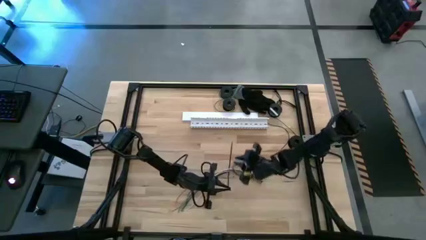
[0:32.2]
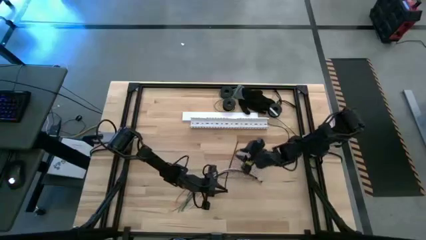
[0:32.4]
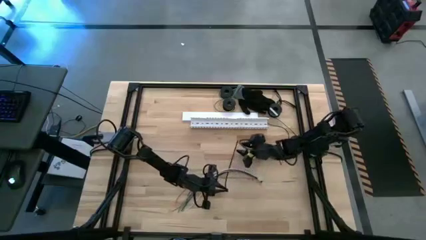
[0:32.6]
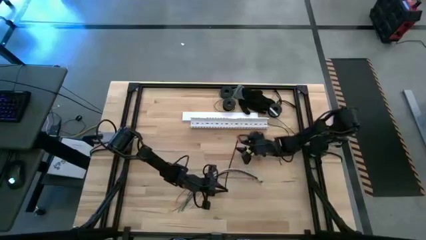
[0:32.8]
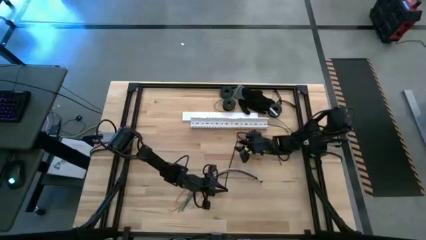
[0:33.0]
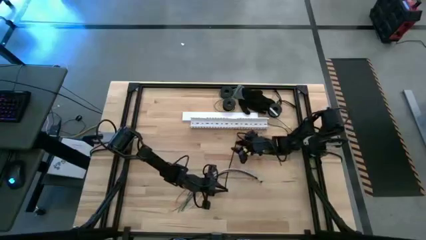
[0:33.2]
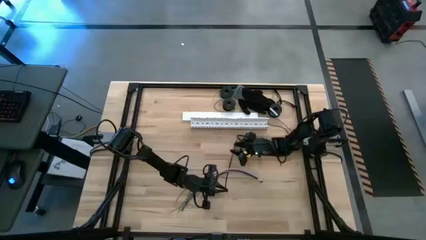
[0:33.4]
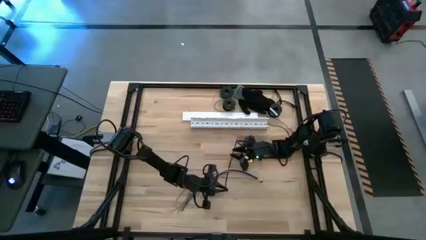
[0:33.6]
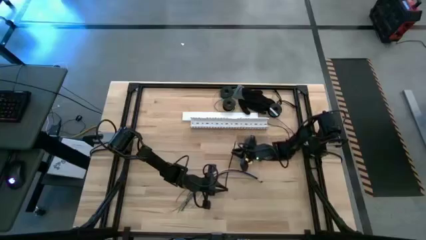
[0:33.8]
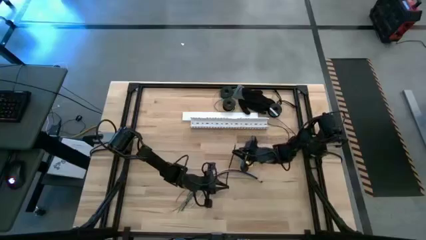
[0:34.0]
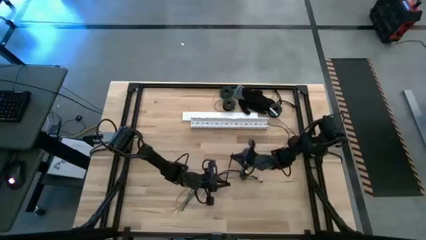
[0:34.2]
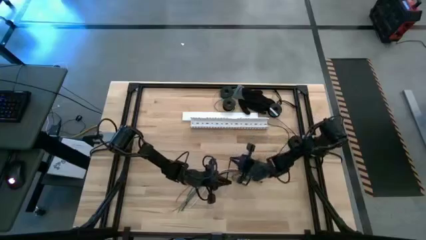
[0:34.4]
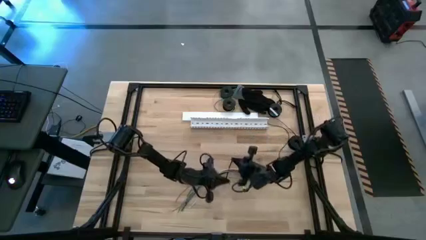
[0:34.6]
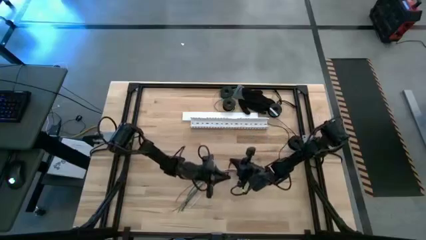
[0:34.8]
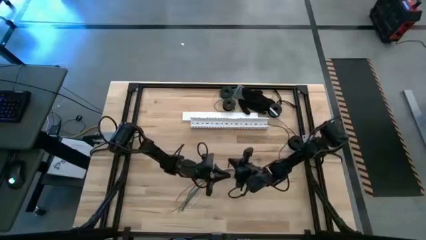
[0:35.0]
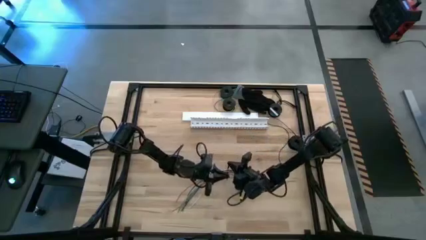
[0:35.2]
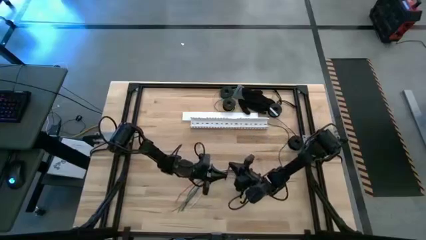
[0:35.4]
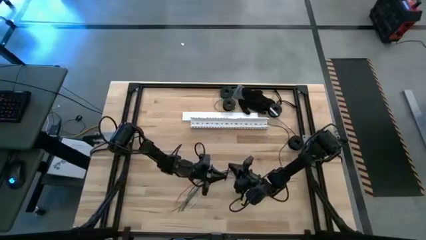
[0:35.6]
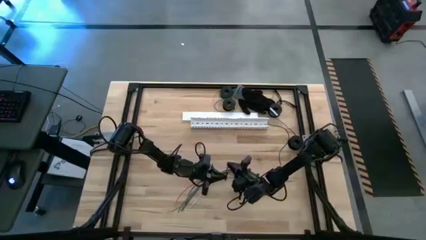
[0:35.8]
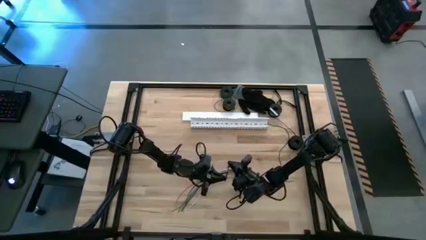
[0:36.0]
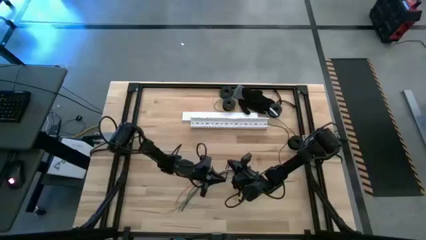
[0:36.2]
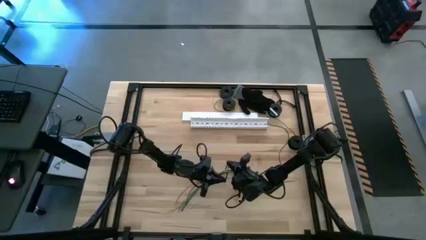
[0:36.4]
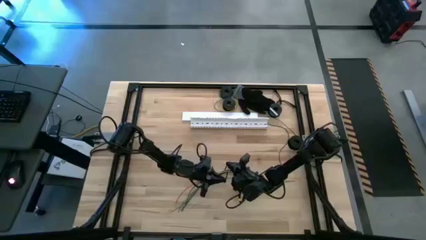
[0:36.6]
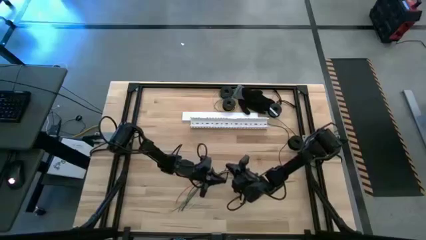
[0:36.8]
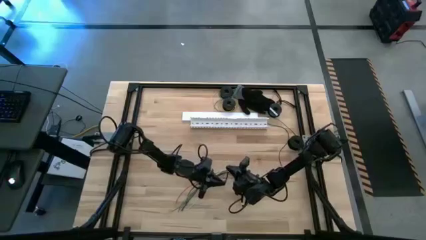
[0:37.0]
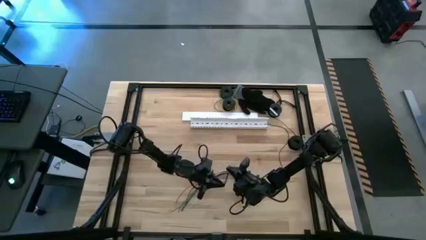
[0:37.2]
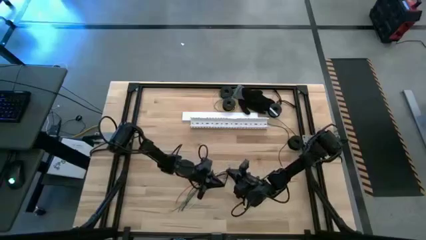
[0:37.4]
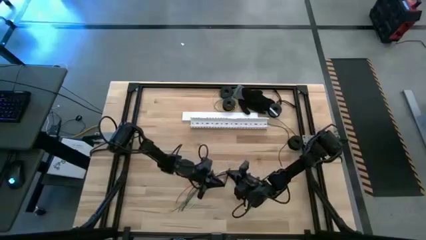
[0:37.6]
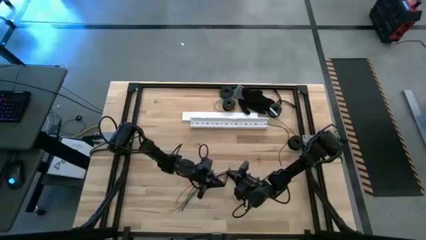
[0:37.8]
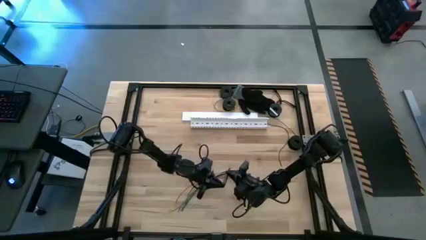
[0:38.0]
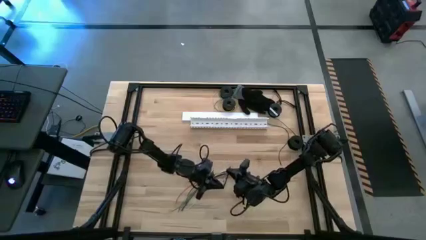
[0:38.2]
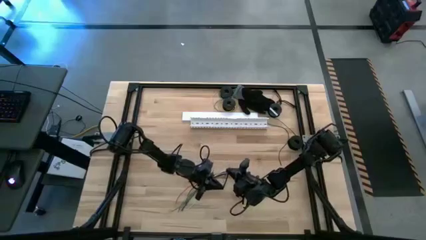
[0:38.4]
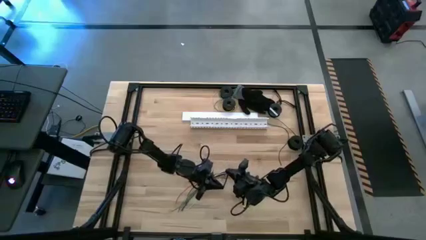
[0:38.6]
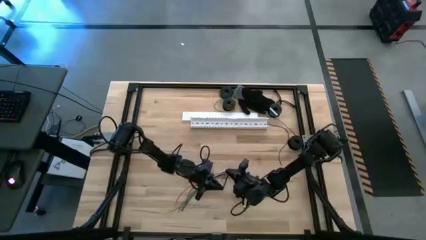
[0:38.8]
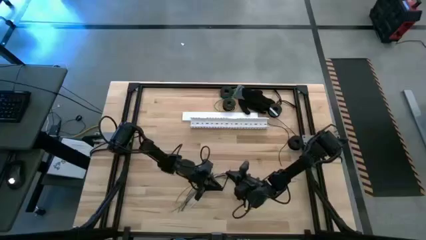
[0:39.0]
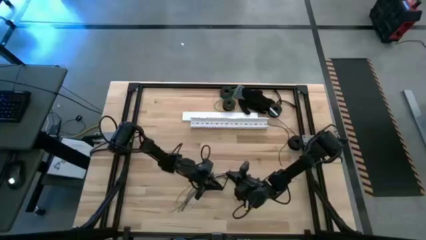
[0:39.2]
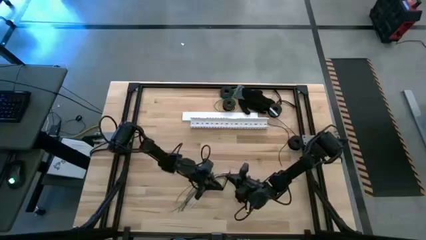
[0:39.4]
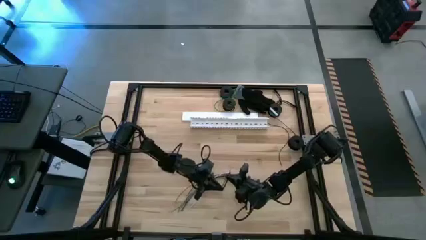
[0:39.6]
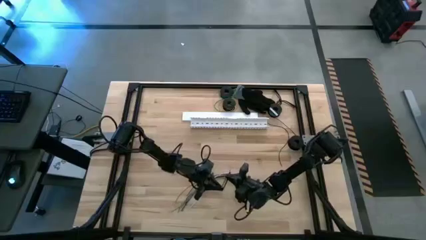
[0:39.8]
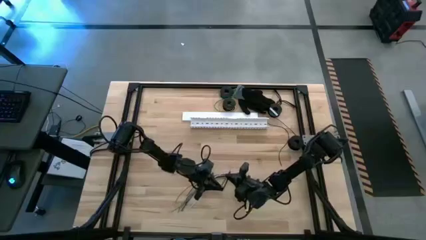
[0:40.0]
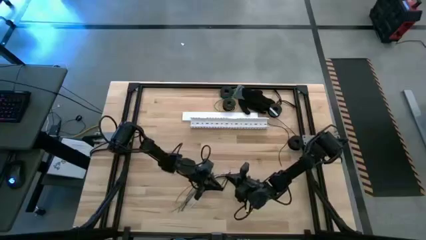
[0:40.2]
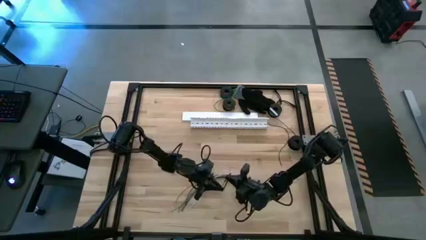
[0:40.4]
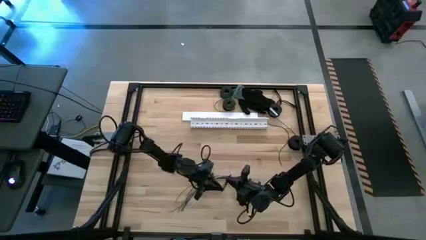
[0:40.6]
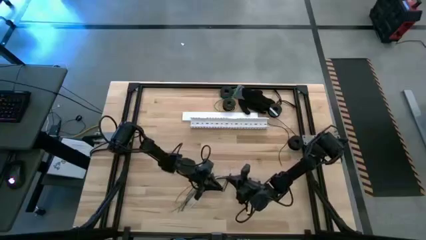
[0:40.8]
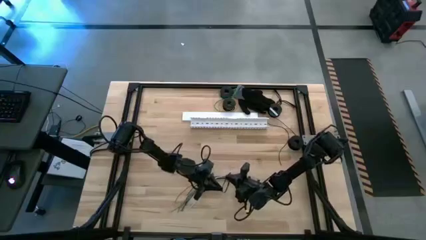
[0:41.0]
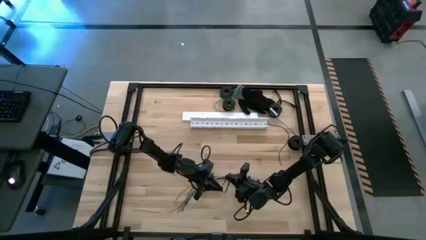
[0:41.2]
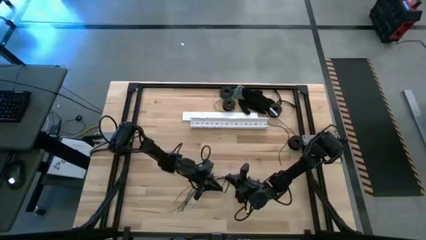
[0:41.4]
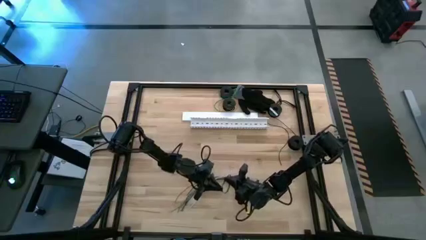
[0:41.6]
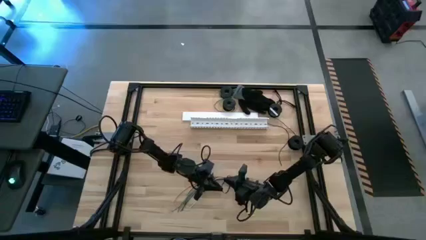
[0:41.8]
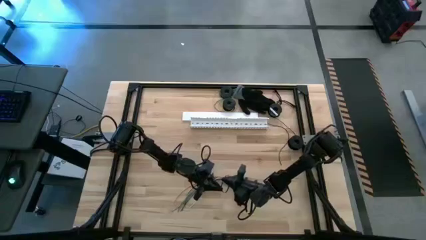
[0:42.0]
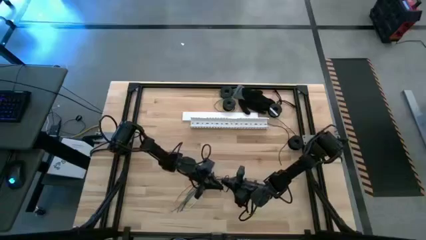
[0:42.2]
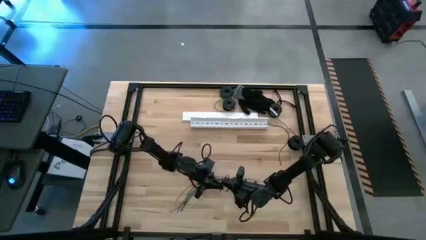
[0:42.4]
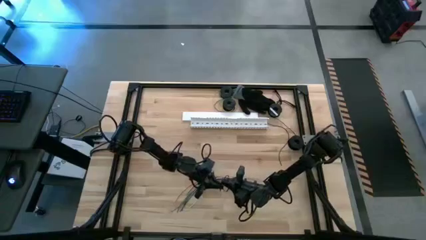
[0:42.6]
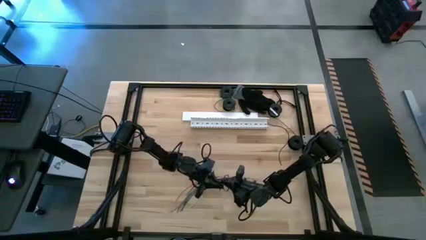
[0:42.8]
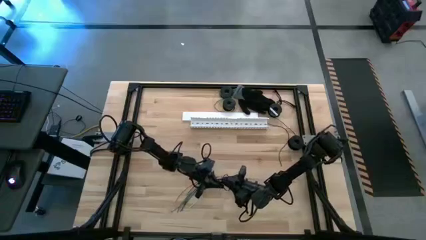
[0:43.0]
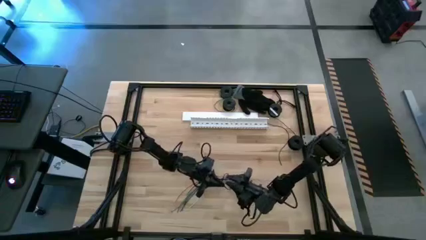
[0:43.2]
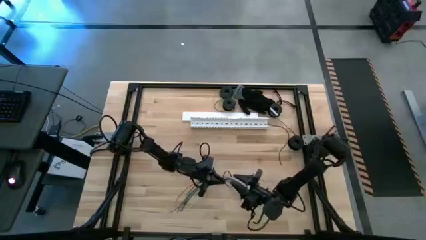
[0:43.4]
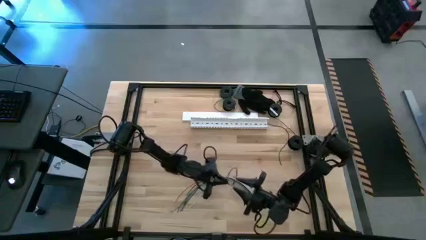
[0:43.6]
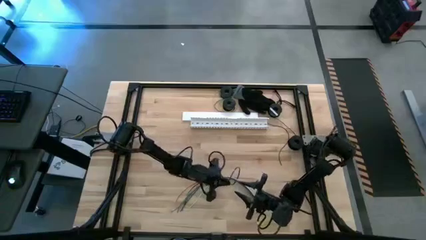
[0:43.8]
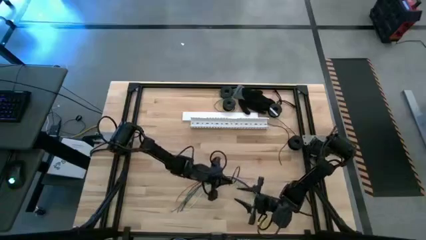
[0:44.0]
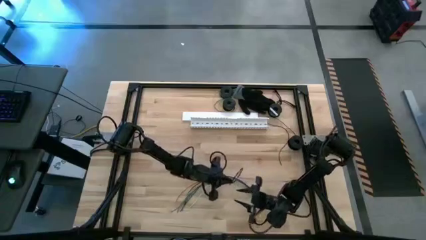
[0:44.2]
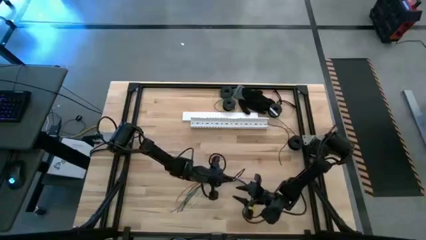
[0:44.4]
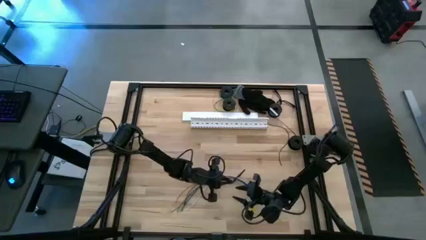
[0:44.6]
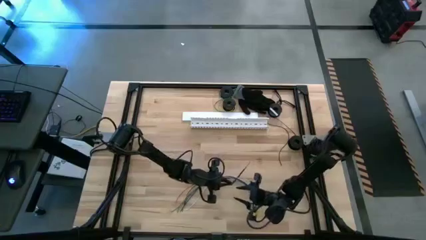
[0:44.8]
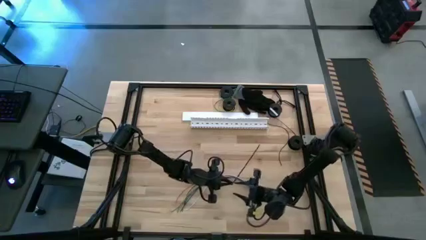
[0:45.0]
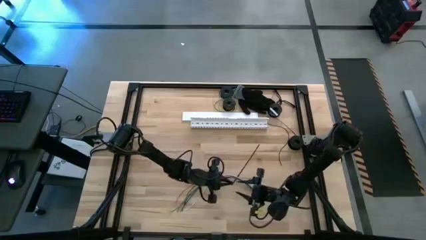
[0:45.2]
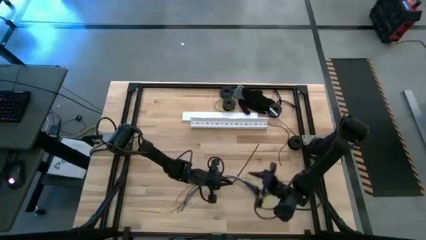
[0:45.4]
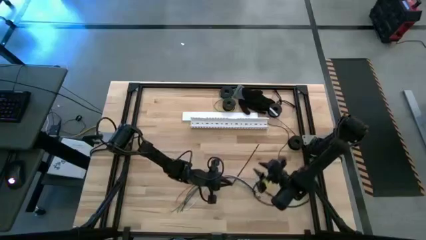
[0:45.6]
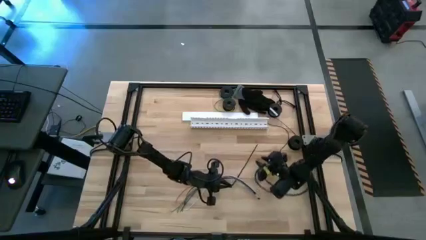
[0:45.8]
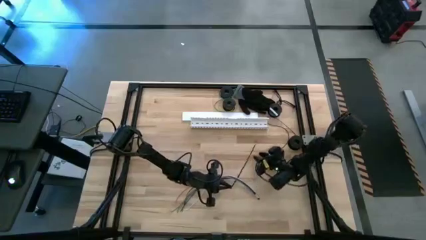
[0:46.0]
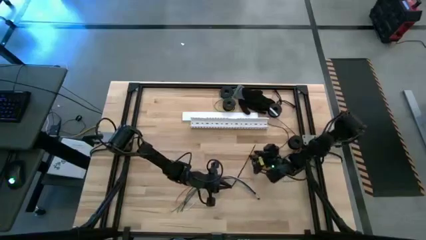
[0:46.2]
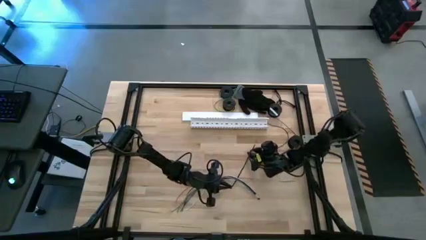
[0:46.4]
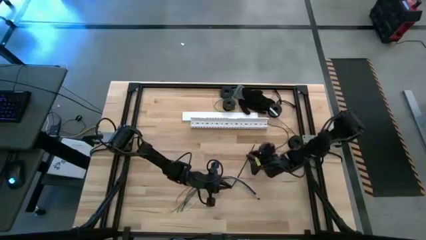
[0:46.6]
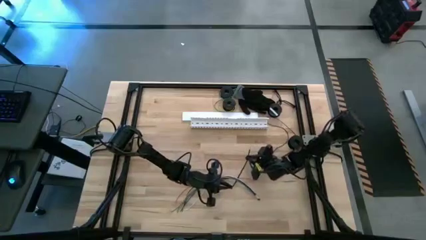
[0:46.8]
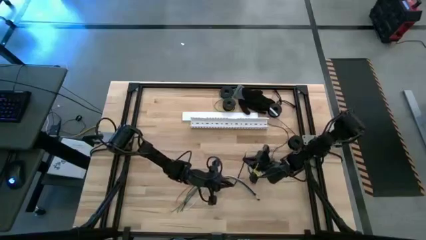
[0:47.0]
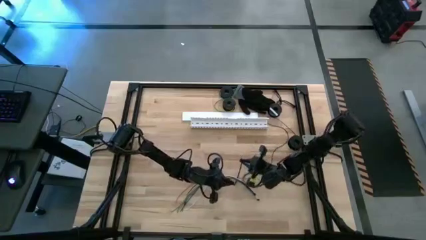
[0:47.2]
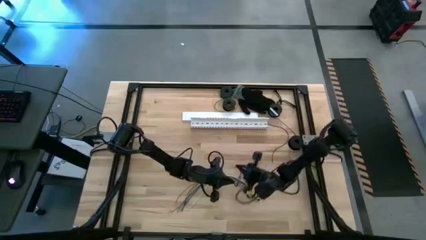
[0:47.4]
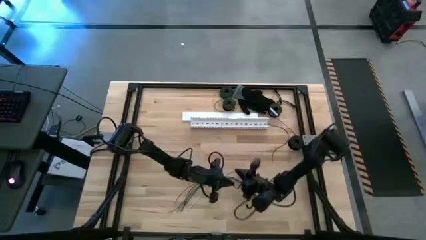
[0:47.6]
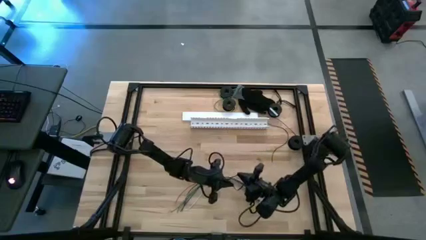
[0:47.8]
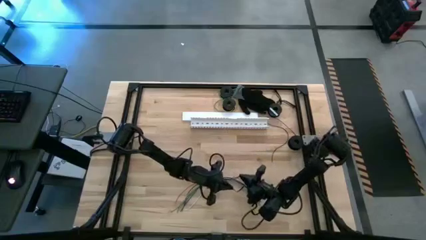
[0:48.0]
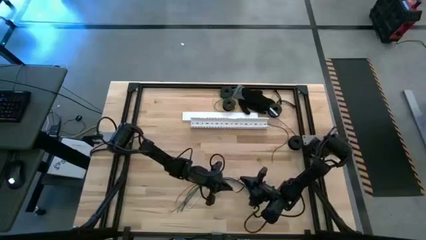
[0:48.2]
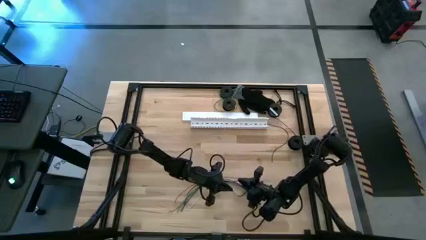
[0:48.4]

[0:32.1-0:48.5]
Task: Ziptie cables
Wrap the cables together using a black zip tie

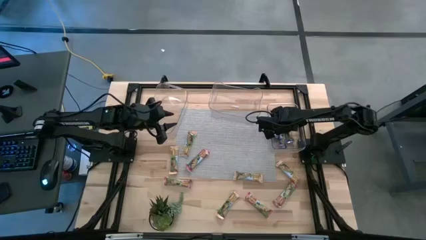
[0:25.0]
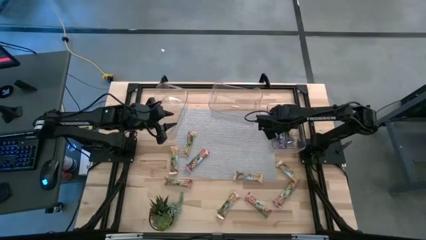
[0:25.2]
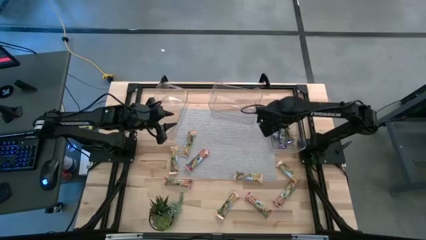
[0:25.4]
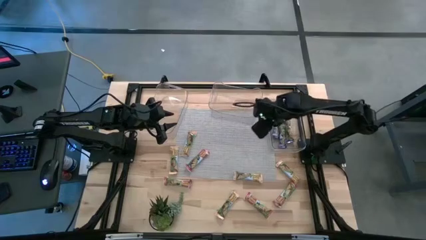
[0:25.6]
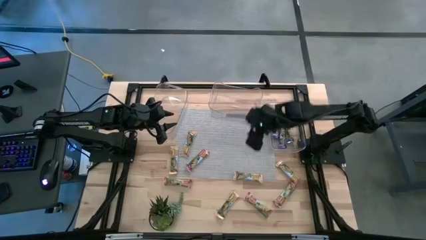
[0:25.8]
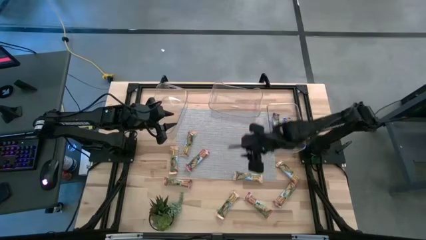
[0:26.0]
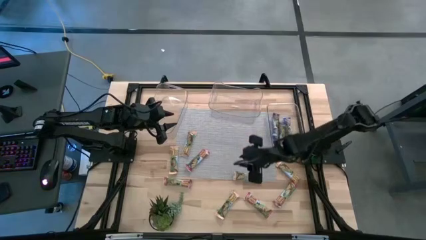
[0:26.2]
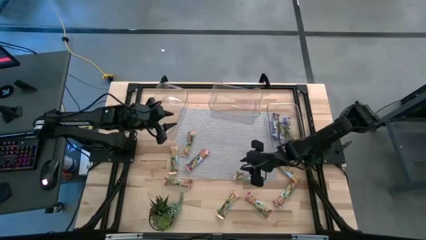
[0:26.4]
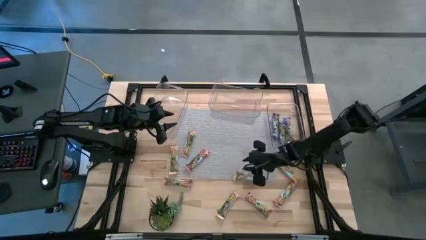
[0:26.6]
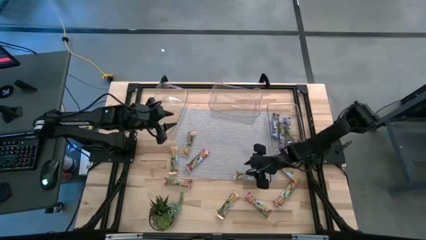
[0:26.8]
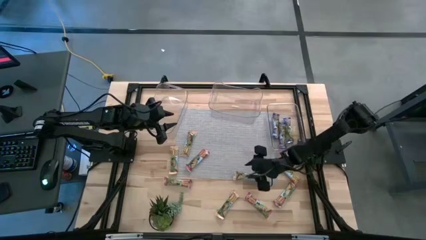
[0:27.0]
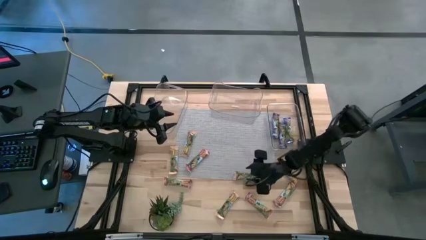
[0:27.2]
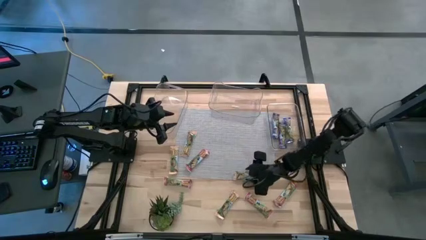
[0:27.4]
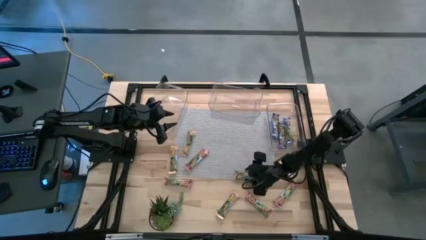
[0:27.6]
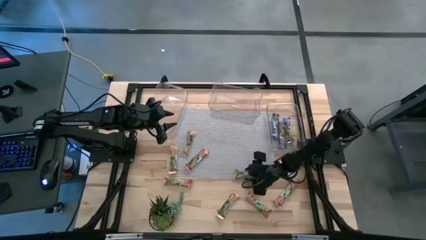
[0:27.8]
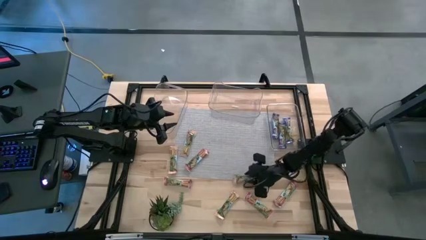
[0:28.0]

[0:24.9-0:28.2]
Task: Pick and place Granola Bars by type
Put the yellow granola bar into the middle transparent bin
